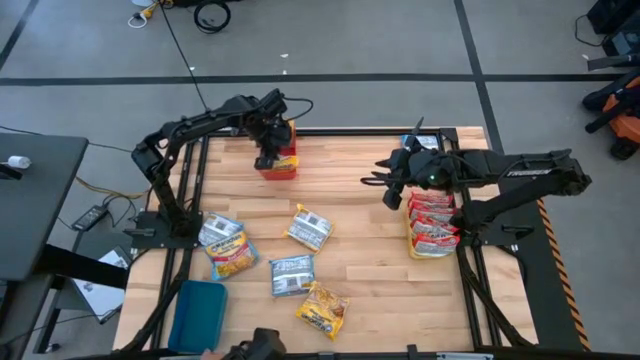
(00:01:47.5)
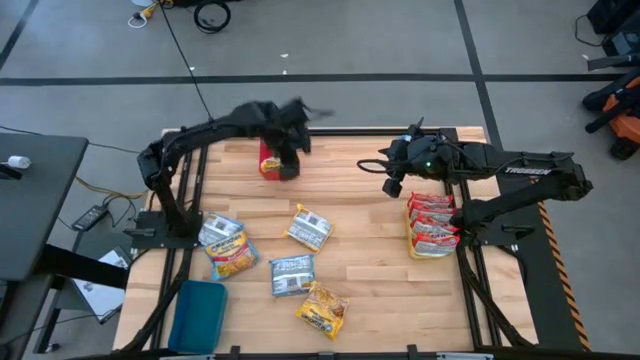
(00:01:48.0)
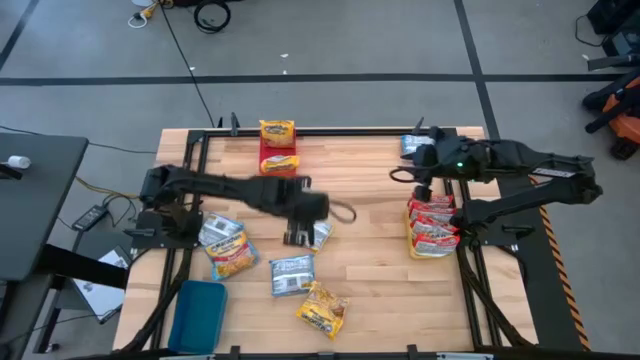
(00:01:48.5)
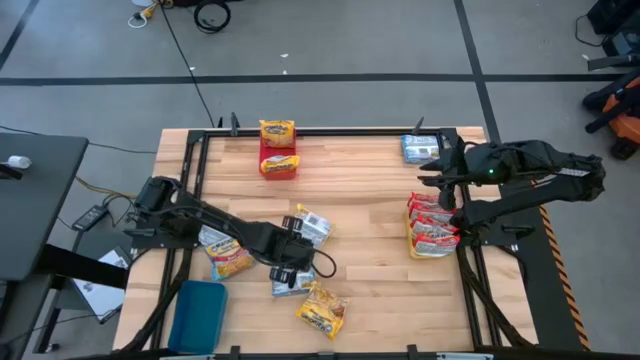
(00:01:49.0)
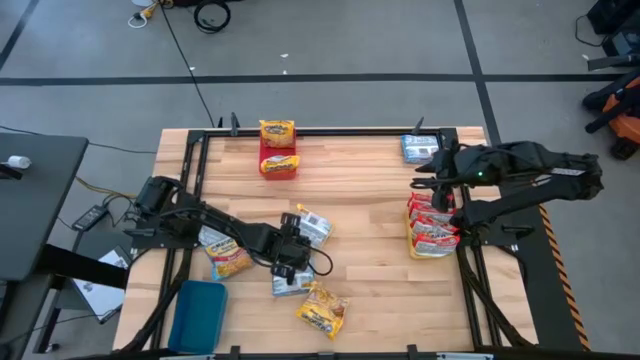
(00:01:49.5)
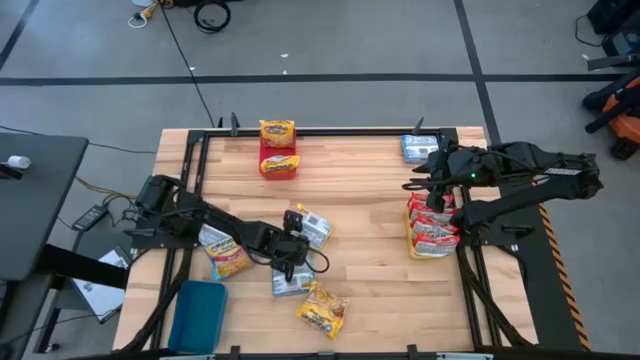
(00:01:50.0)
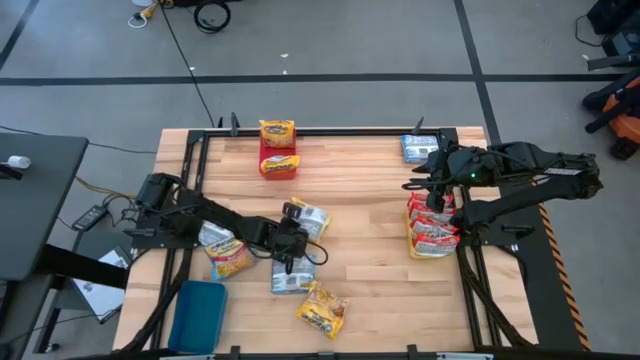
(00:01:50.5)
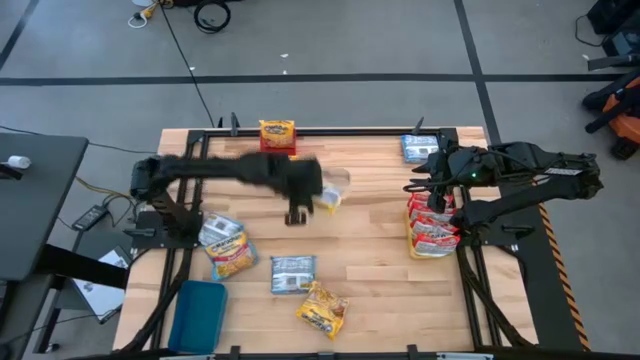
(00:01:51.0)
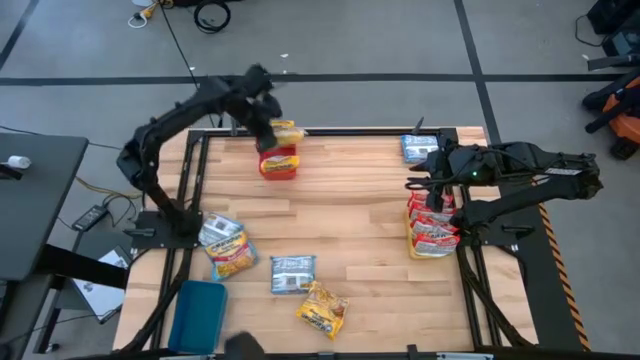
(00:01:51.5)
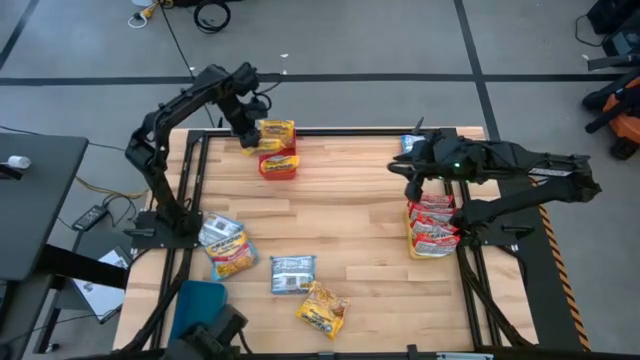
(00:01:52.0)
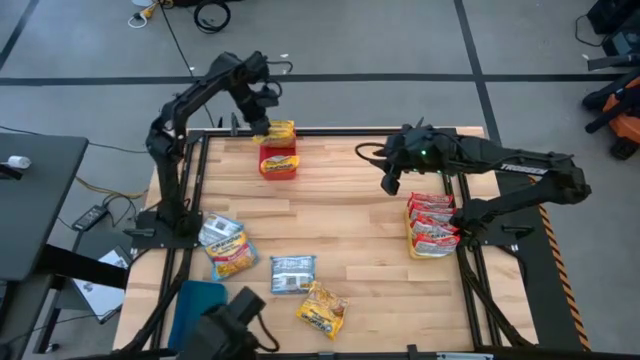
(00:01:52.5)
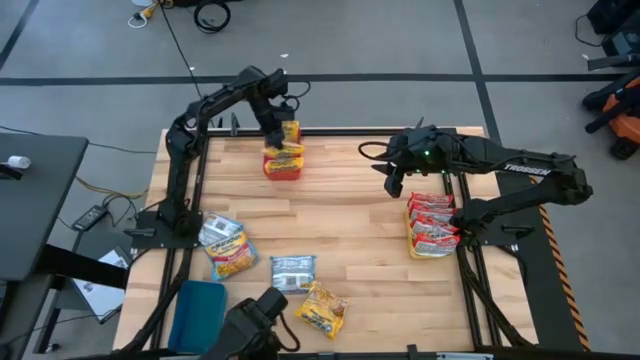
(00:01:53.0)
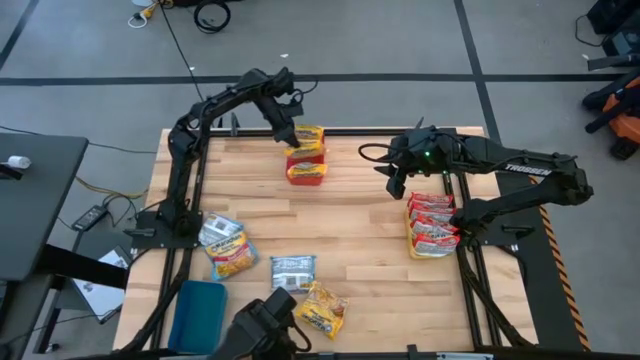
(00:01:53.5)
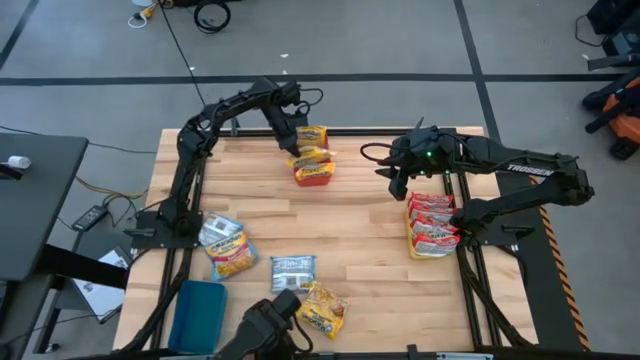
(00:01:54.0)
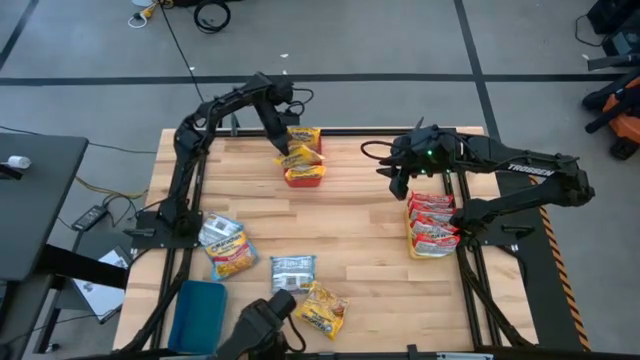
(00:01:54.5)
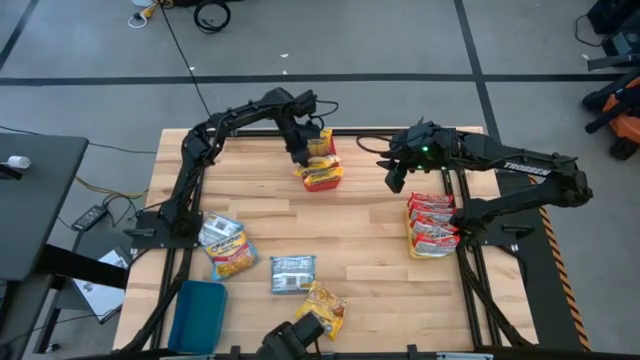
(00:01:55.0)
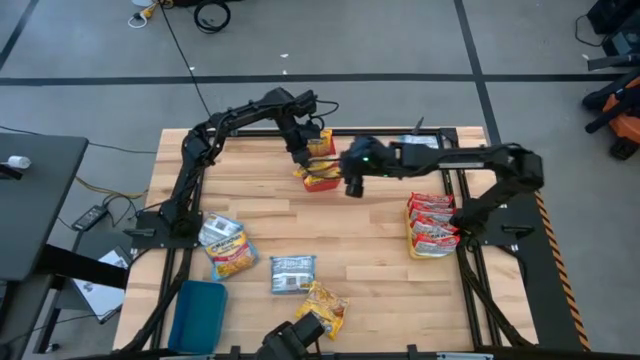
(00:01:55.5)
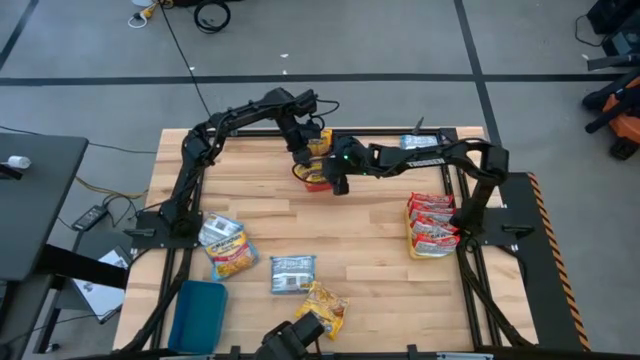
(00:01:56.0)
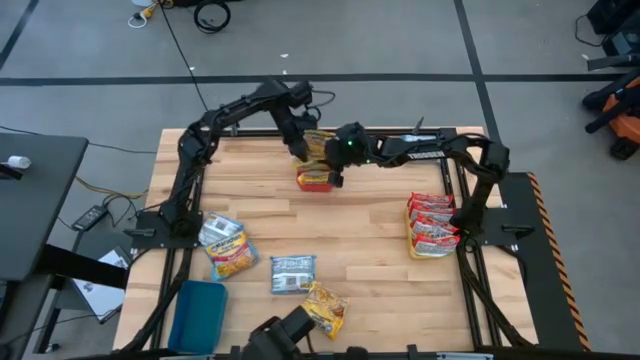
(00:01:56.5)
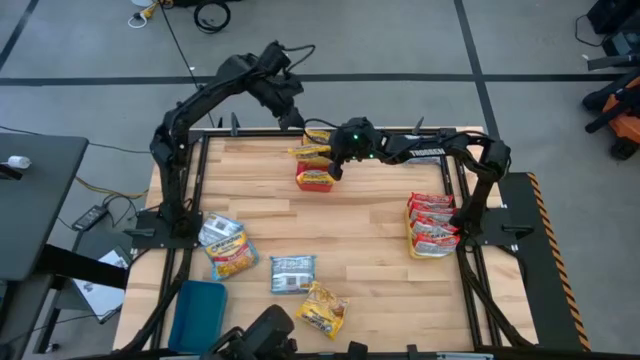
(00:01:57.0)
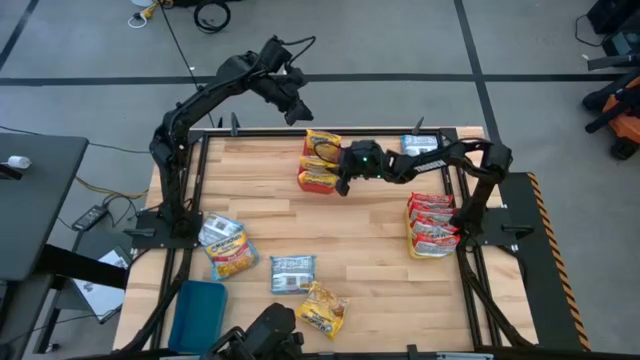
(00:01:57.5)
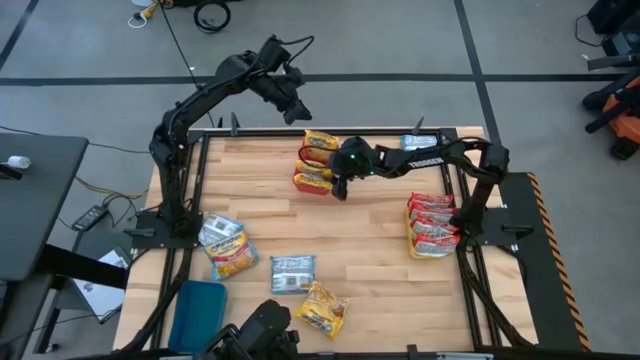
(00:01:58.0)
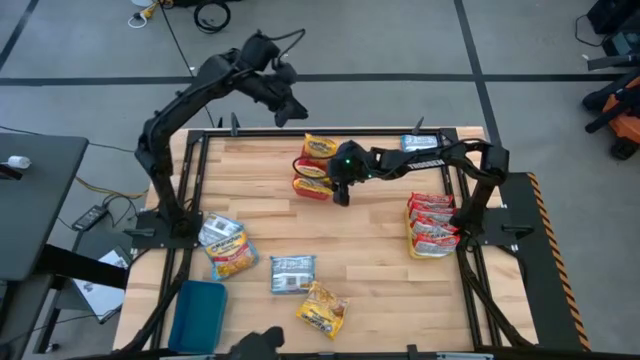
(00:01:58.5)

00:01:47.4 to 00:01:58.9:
Task: Sort Maruchan noodles
Put the yellow noodle pack into the pink bin

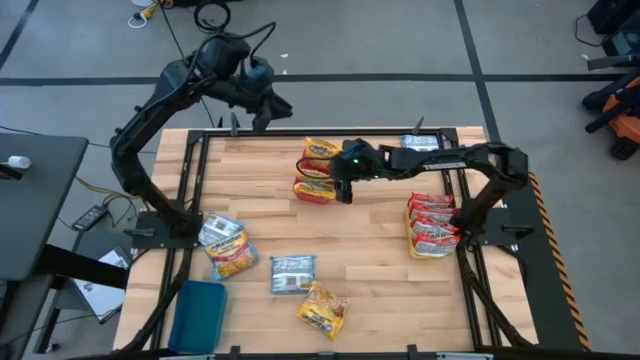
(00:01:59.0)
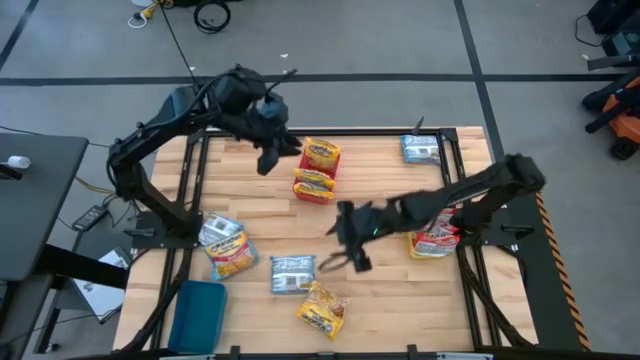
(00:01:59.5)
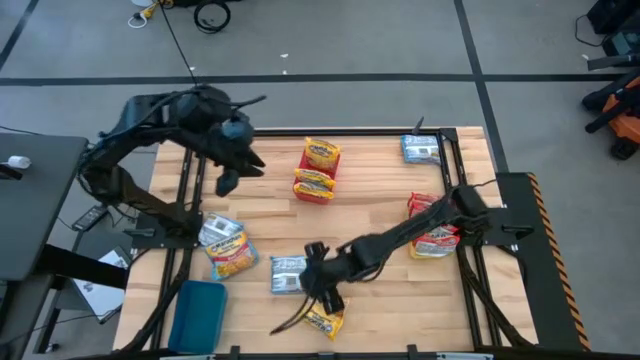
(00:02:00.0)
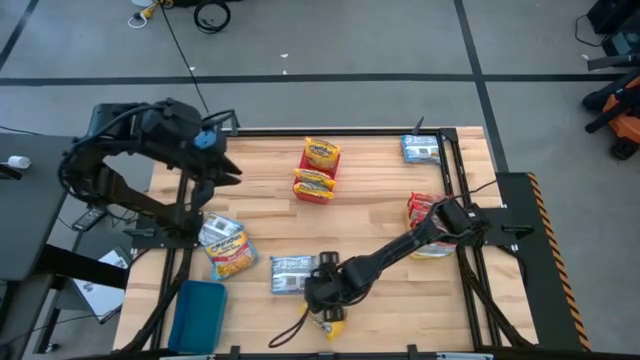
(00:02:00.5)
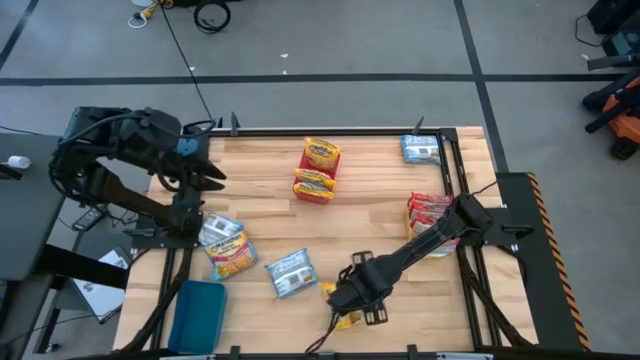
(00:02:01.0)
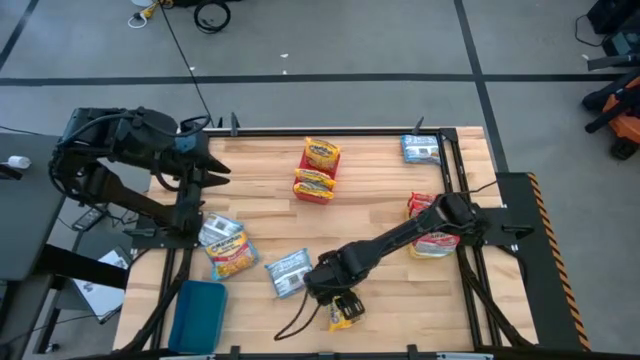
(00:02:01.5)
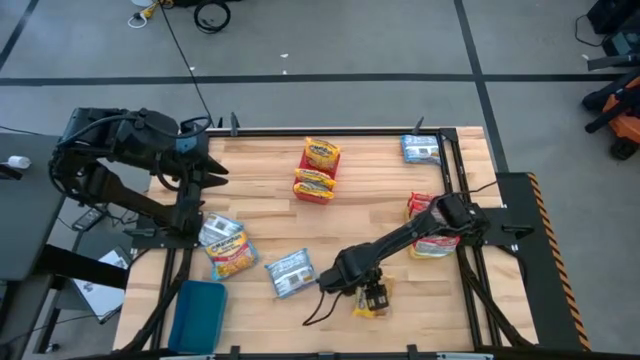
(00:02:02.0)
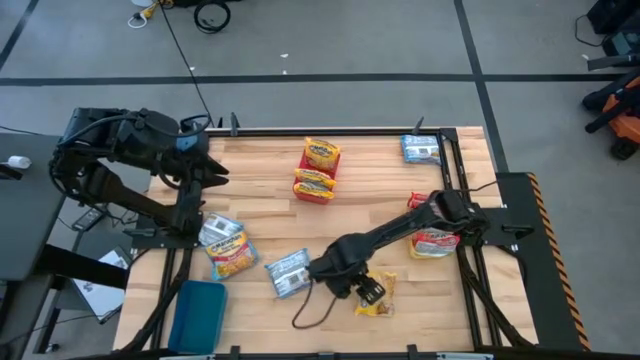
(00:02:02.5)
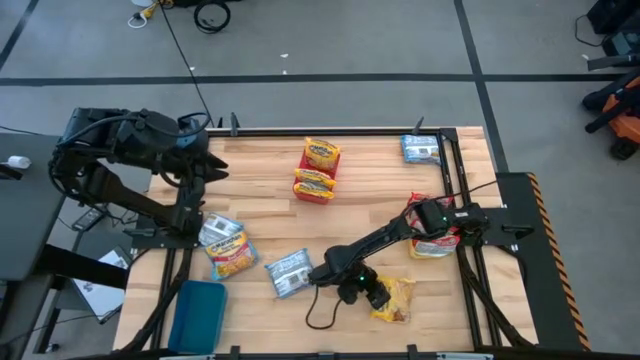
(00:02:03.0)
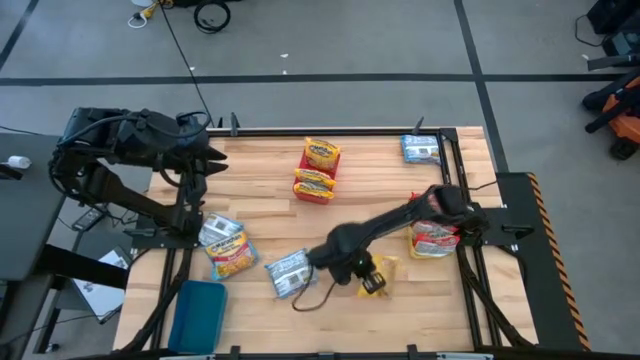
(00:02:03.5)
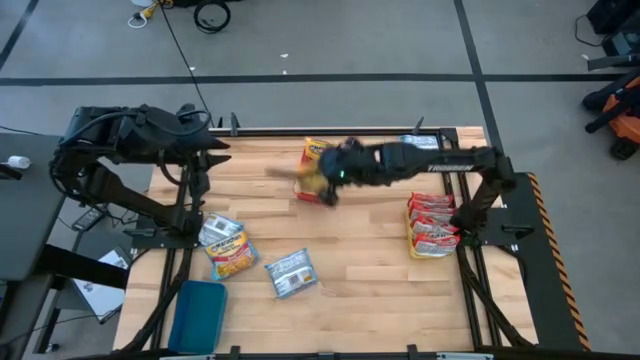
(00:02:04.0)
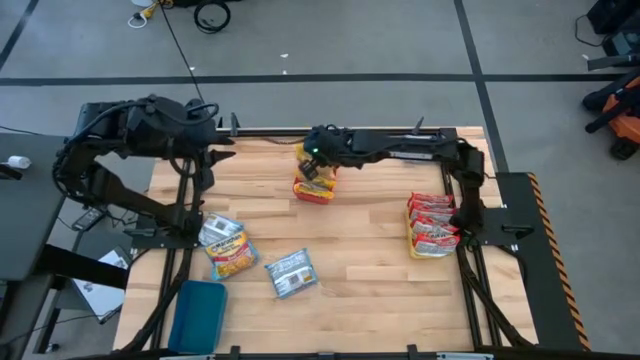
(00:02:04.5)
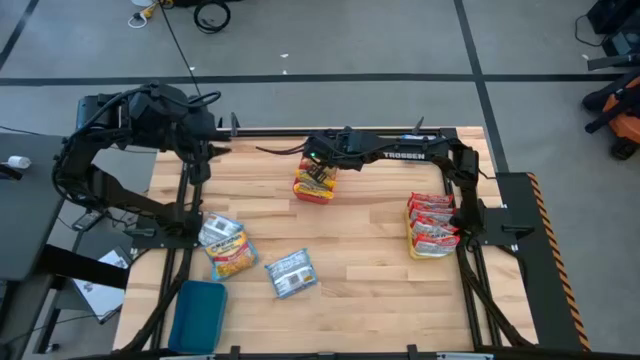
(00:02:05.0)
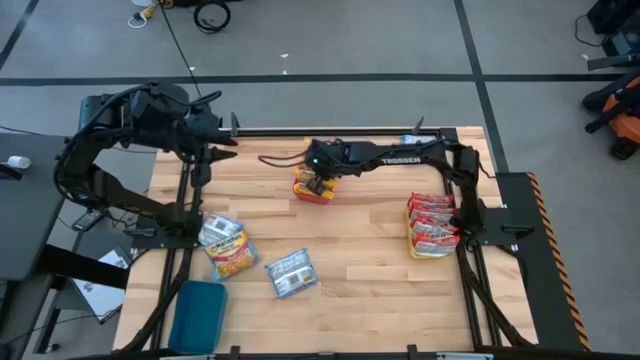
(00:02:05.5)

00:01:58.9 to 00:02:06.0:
Put the yellow noodle pack into the pink bin

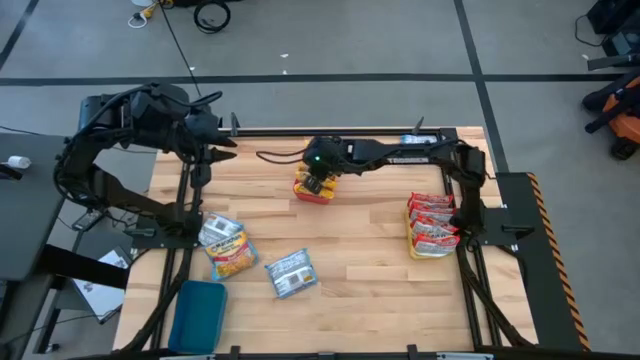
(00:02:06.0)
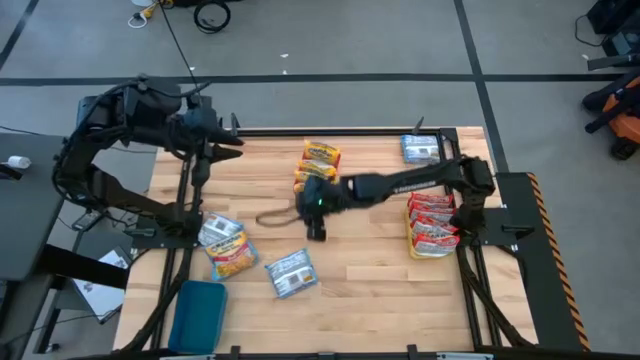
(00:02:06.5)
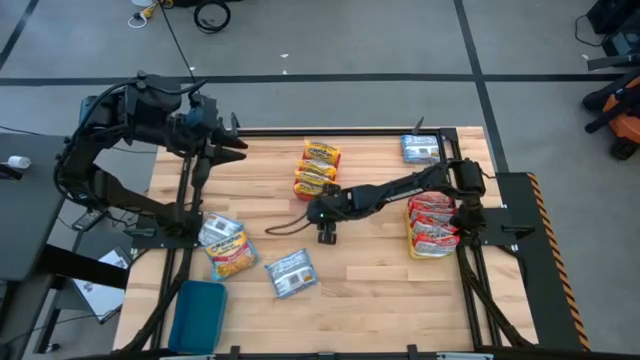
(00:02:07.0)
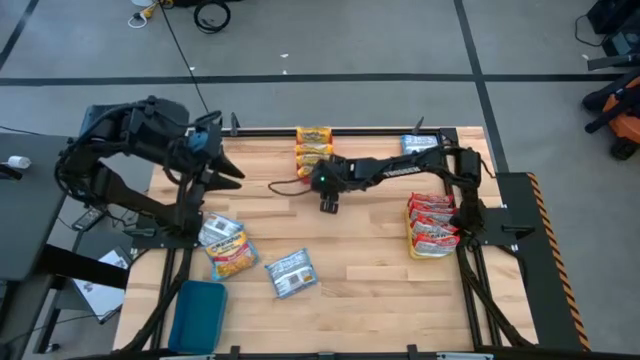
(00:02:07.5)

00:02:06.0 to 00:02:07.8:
Adjust the pink bin
